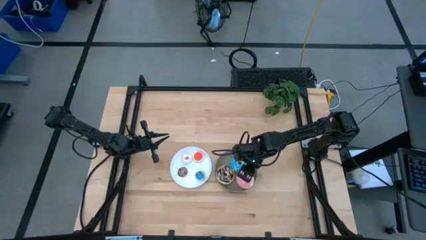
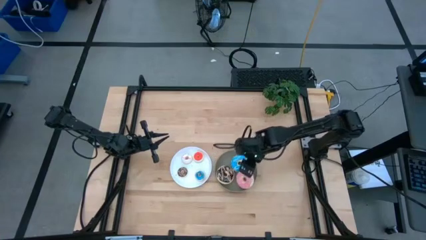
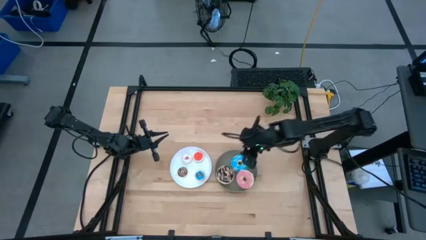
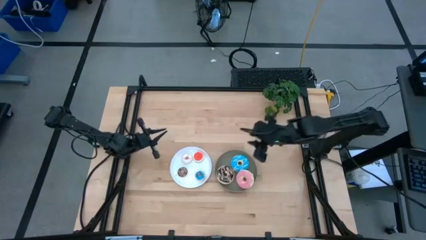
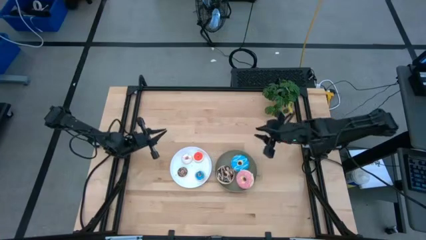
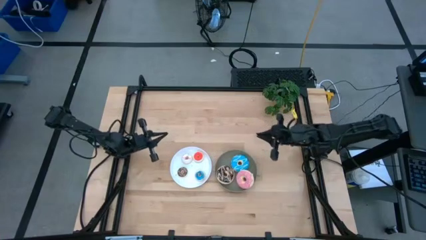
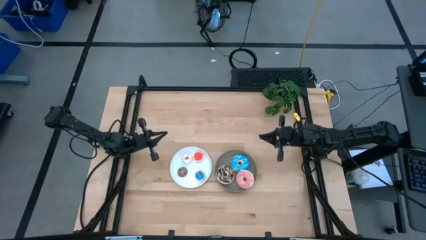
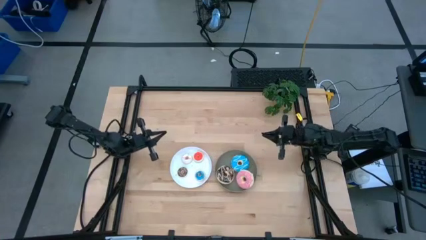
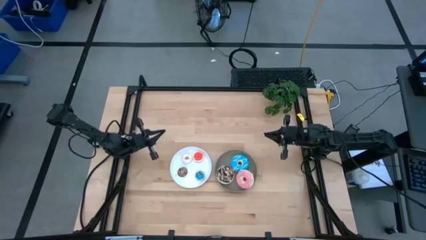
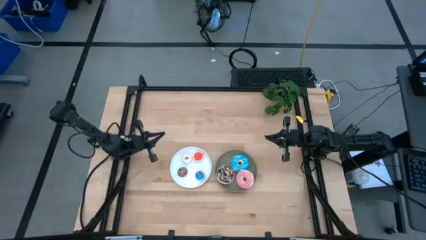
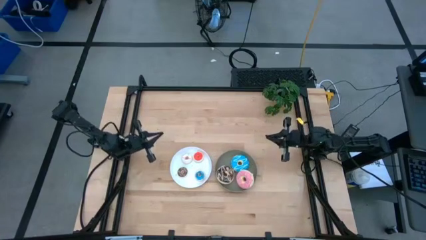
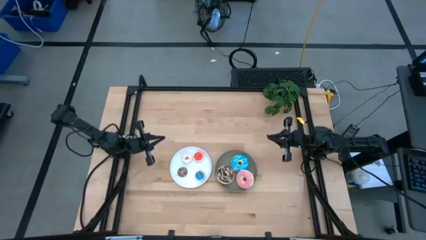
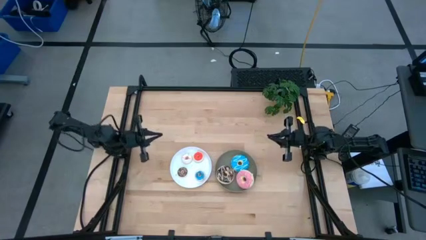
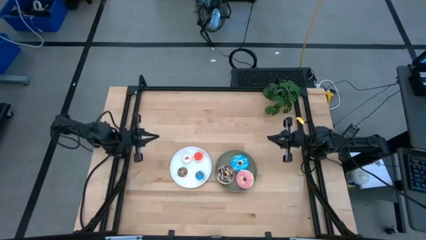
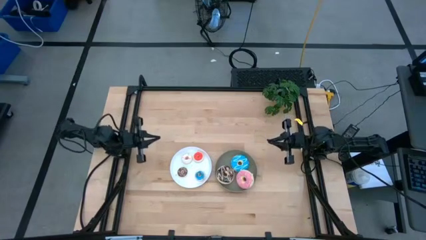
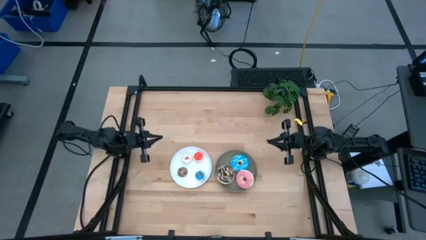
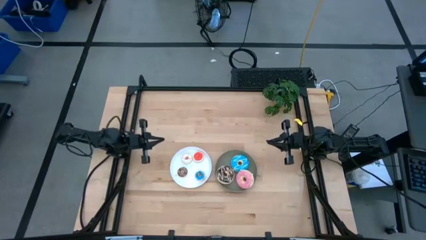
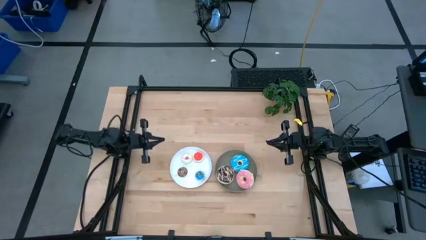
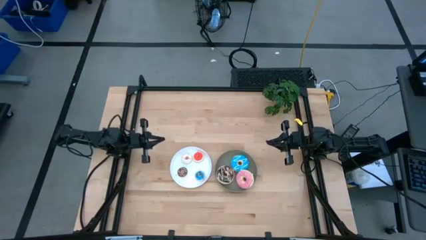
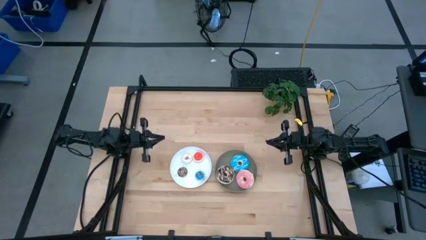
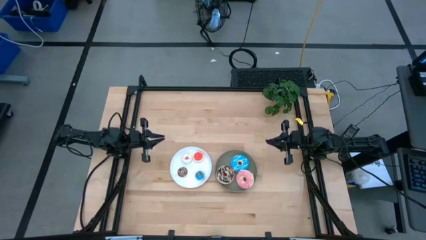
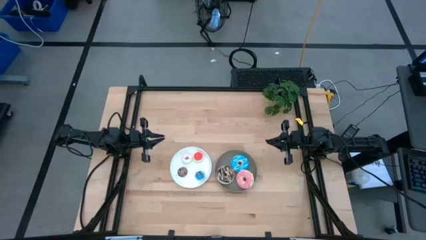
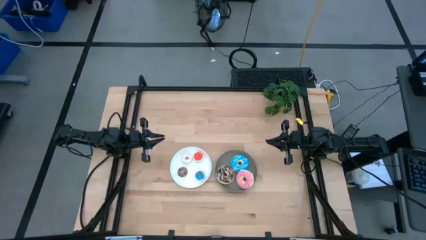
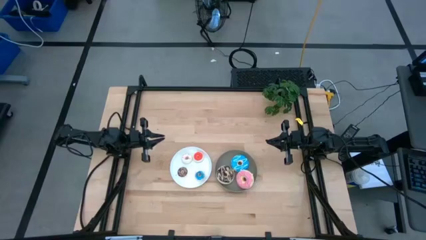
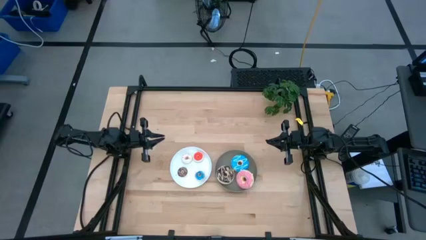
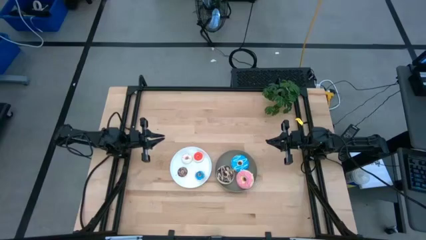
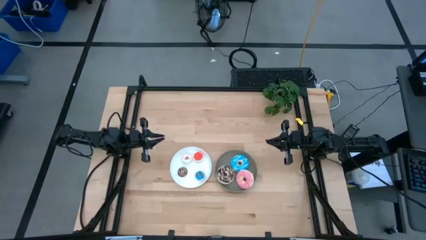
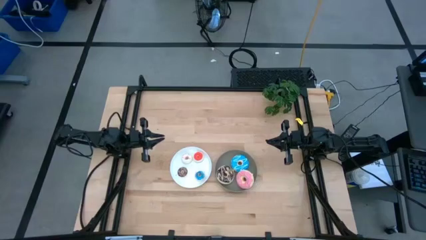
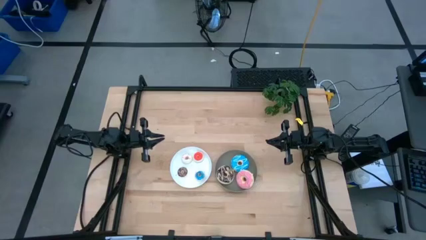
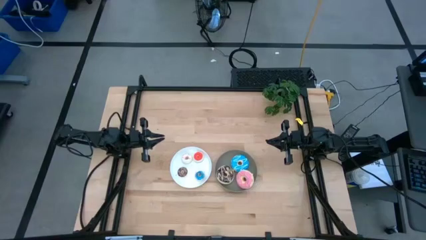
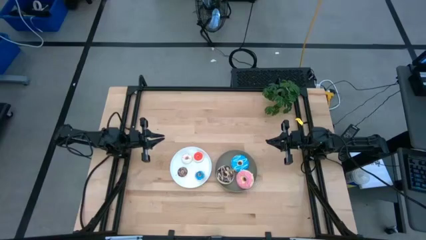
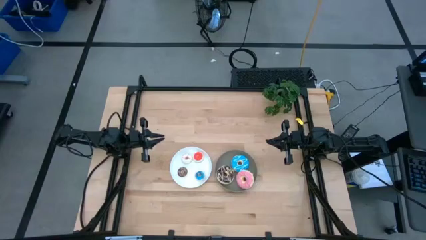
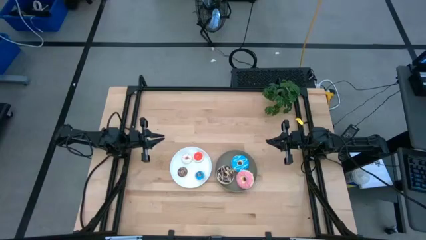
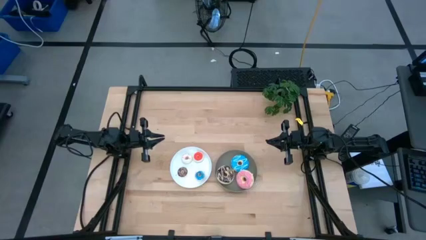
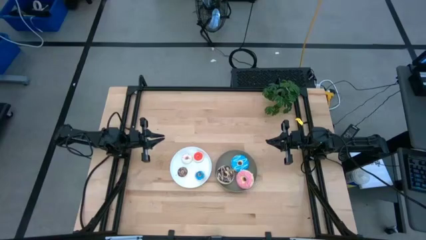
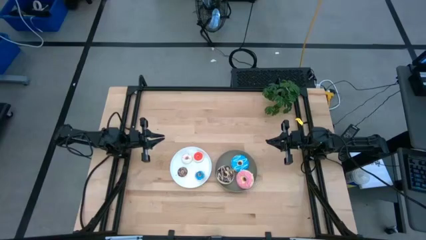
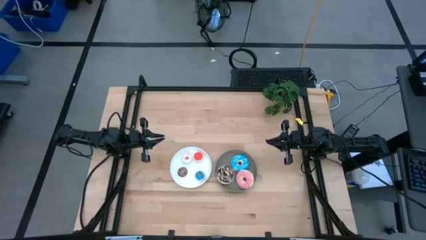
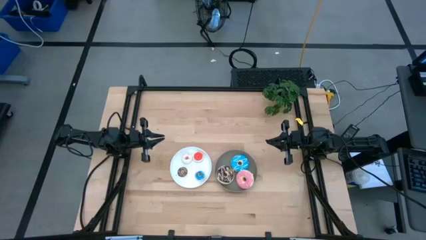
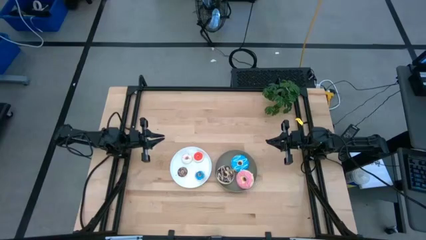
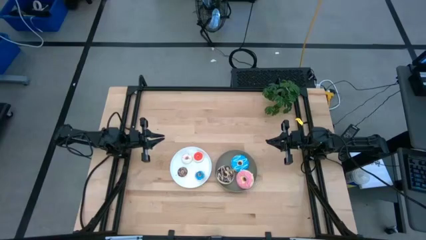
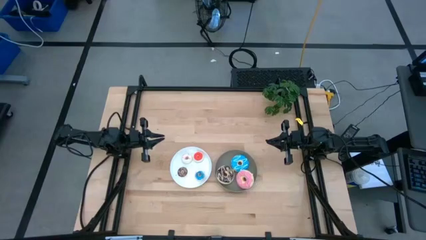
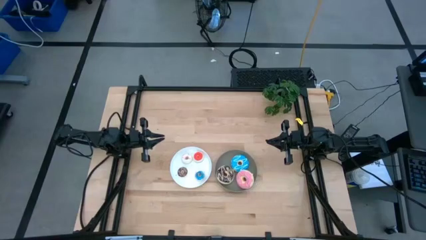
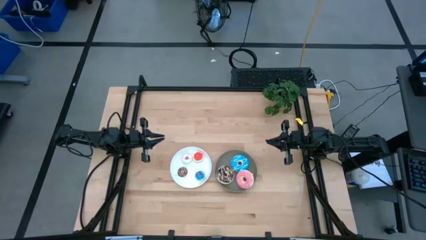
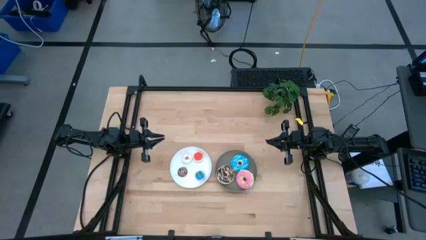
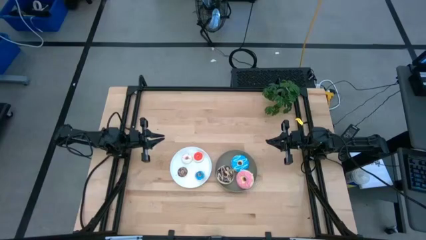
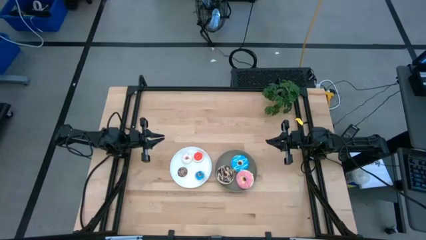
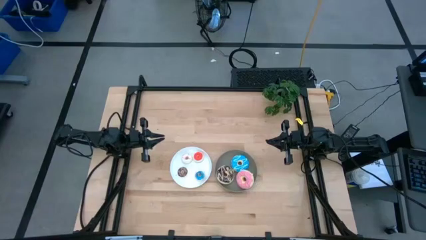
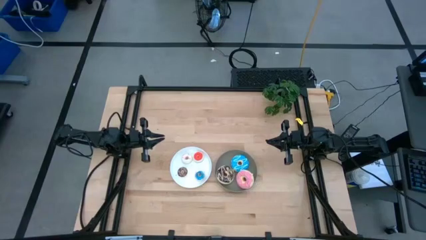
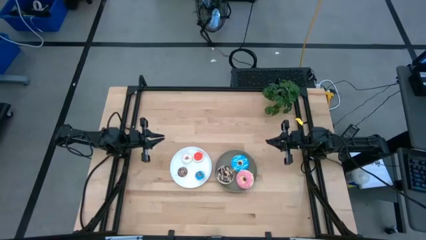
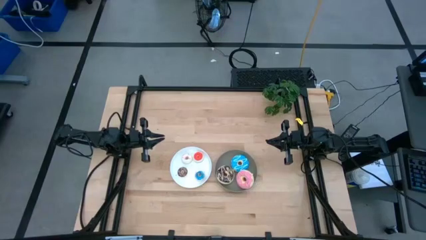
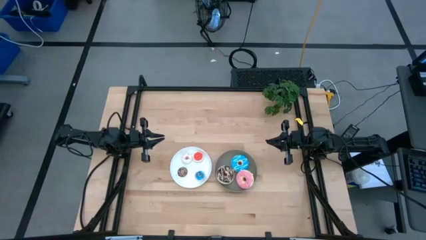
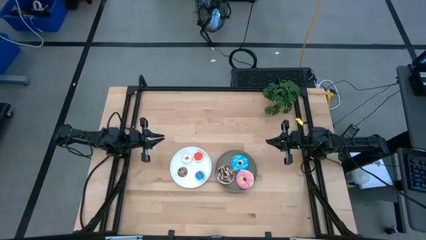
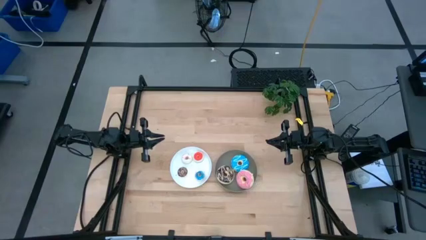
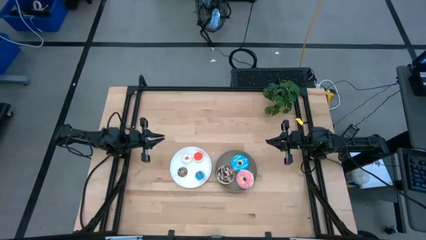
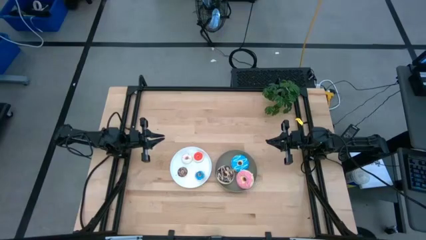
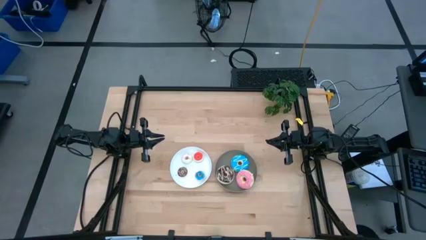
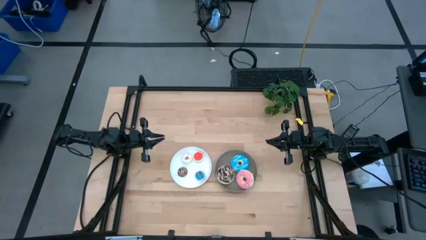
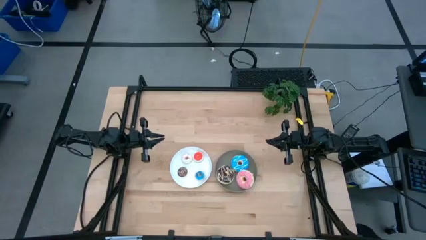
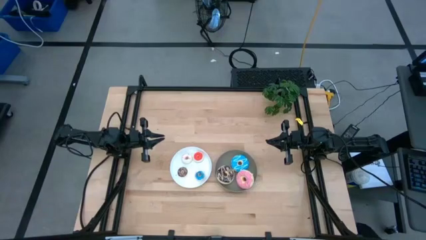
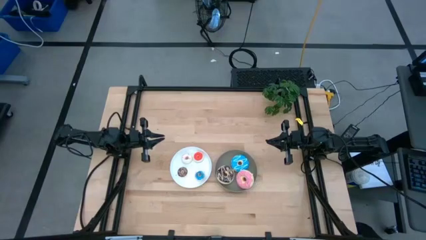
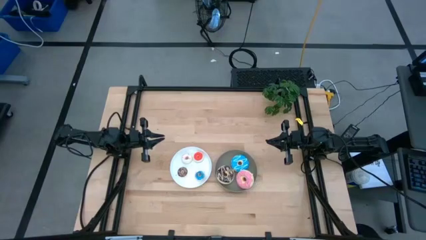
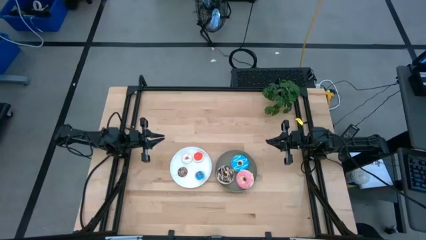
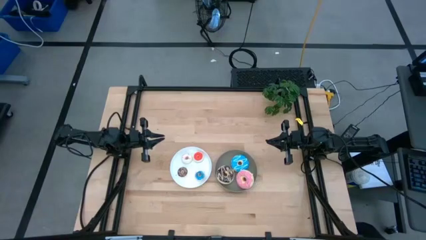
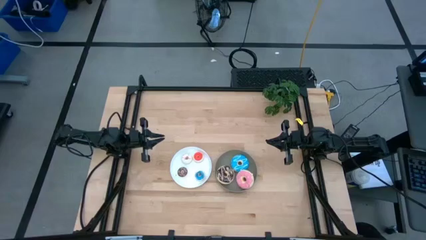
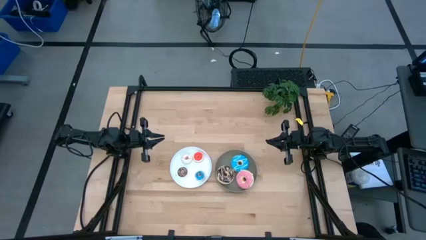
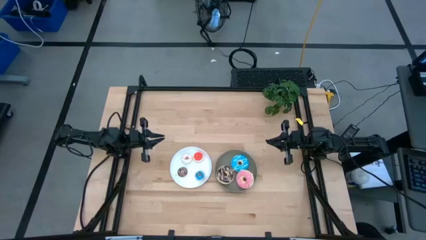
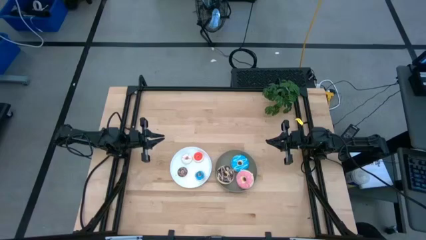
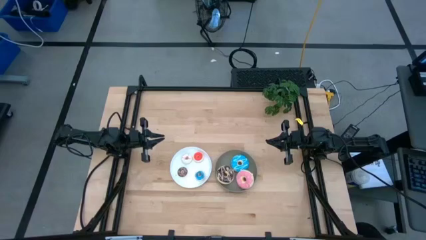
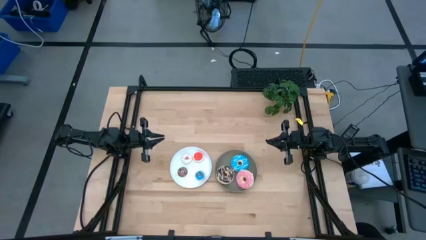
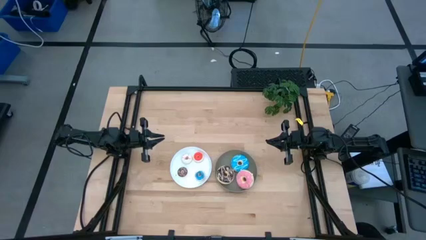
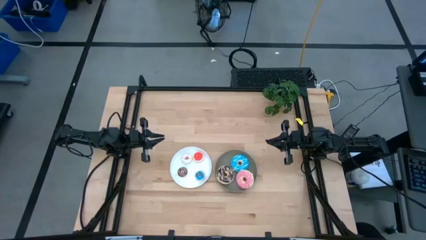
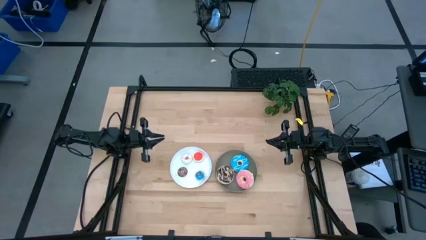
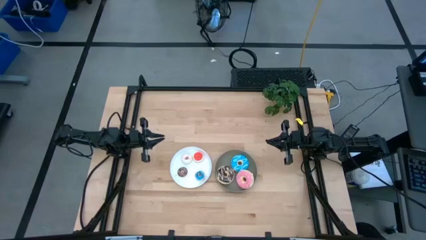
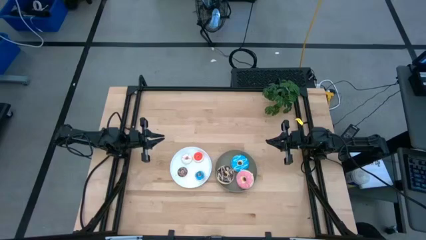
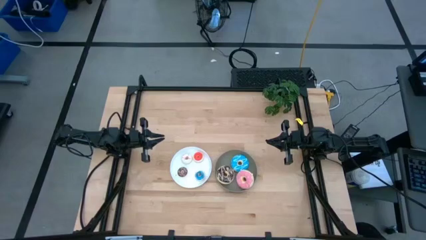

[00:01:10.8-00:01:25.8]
Task: Pick & Place donuts
Return to Home Position

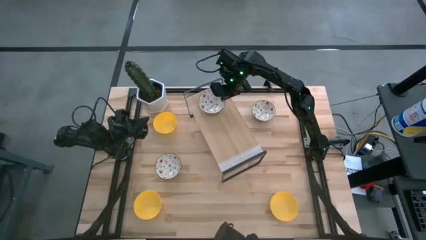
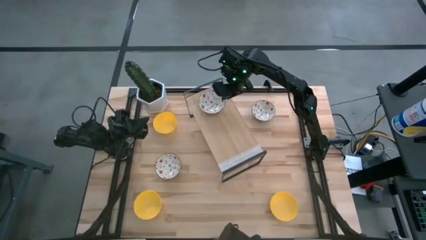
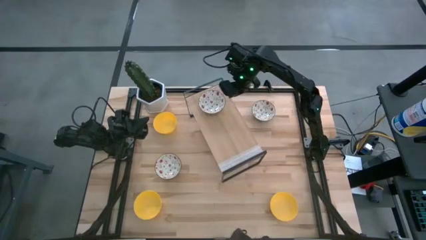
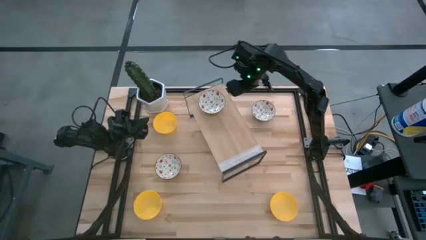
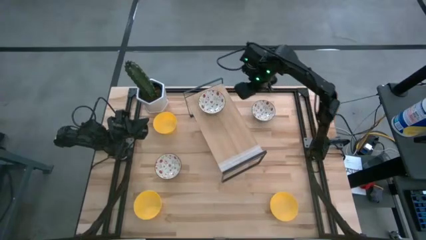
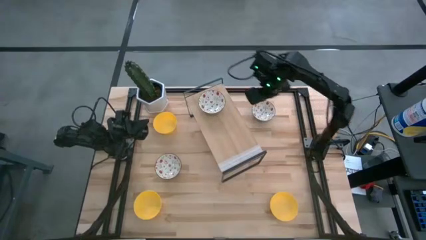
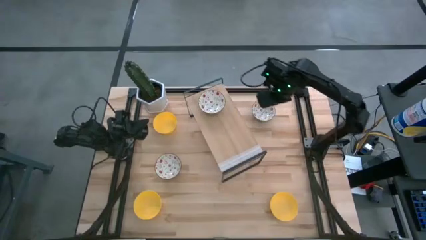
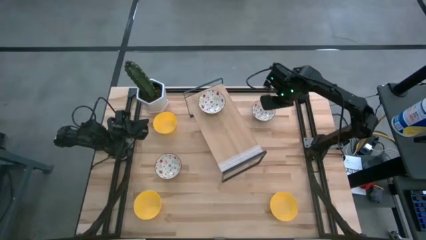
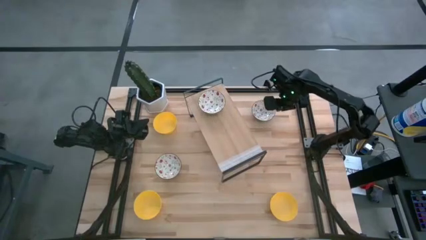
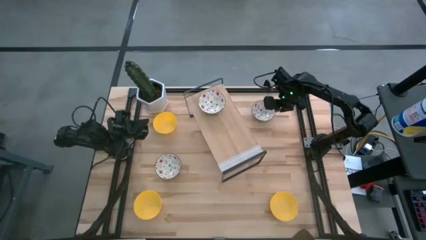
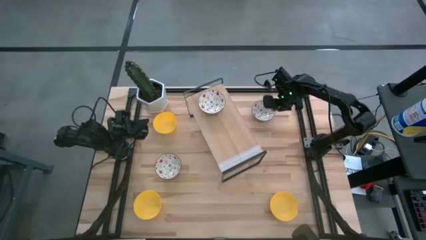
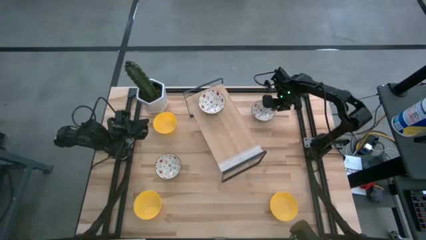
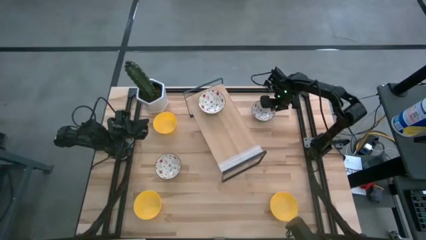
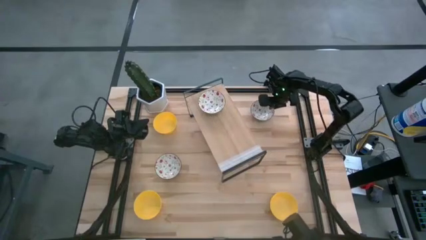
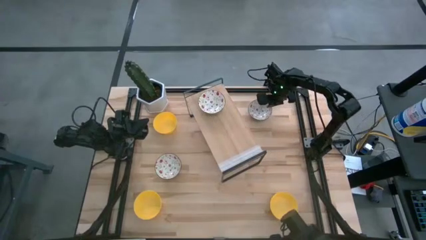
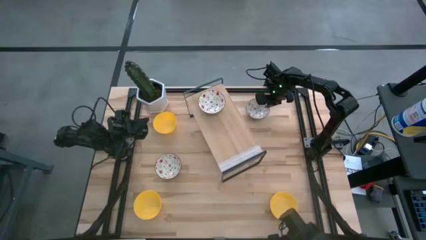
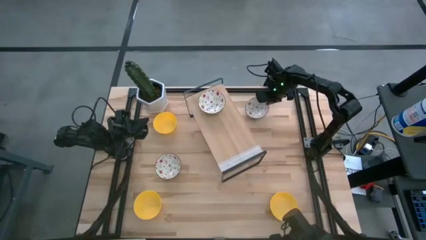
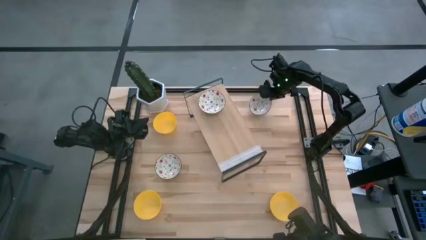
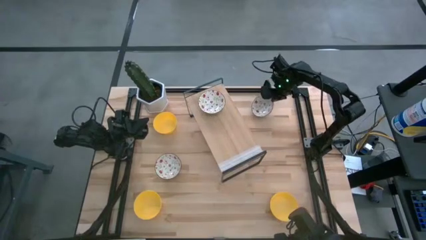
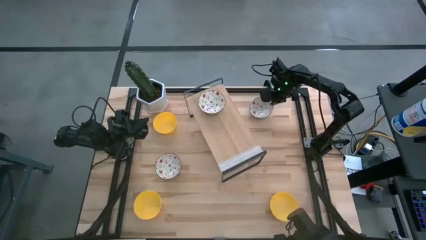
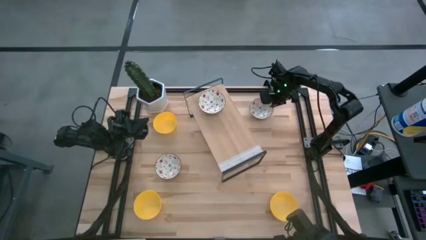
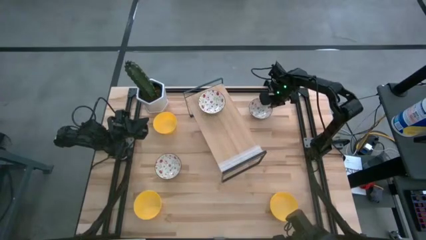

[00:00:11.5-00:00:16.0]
Task: Pick & Place Mini bowls
Stack the top white patterned bowl on the white patterned bowl on the shelf
